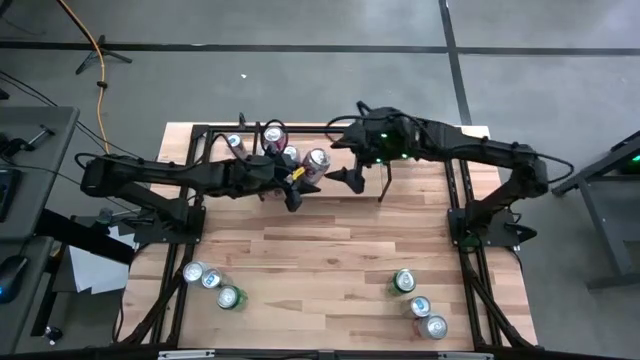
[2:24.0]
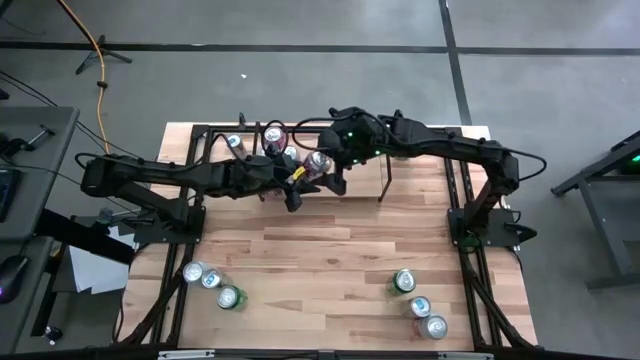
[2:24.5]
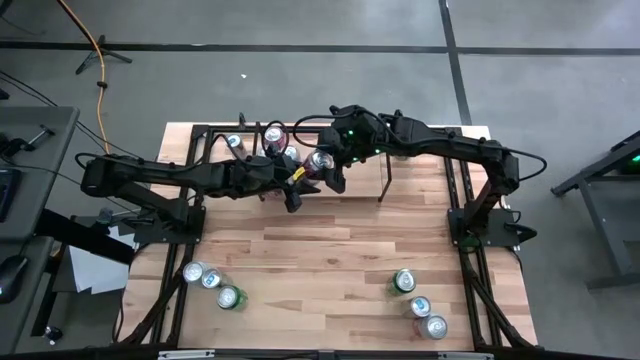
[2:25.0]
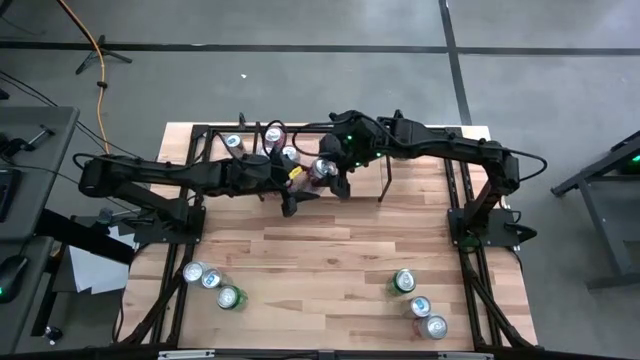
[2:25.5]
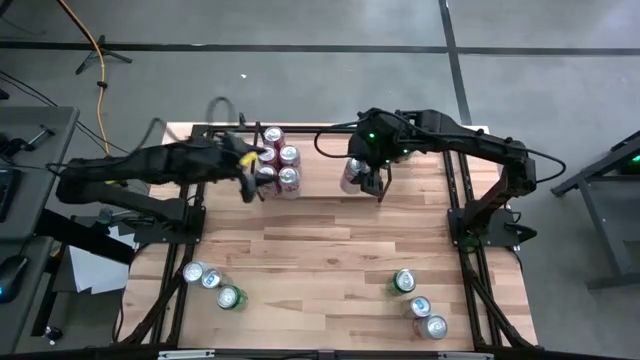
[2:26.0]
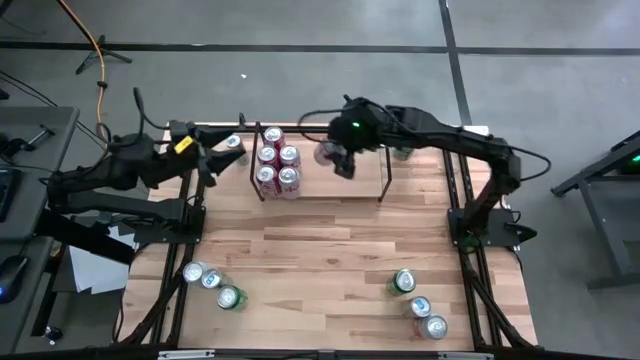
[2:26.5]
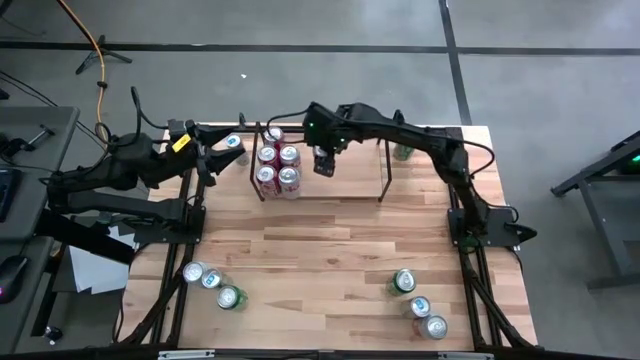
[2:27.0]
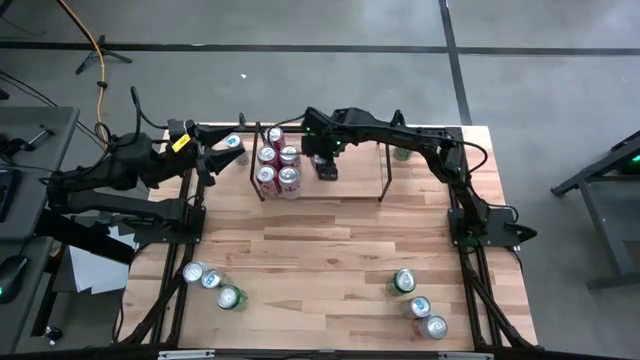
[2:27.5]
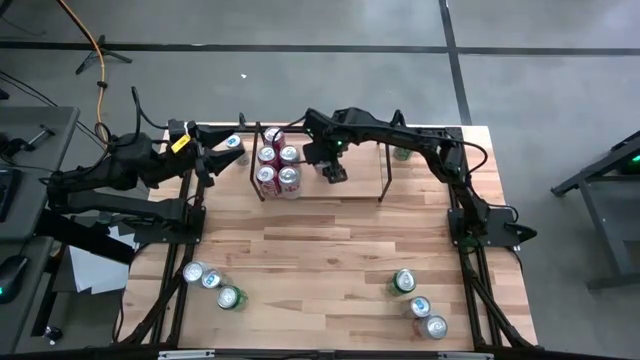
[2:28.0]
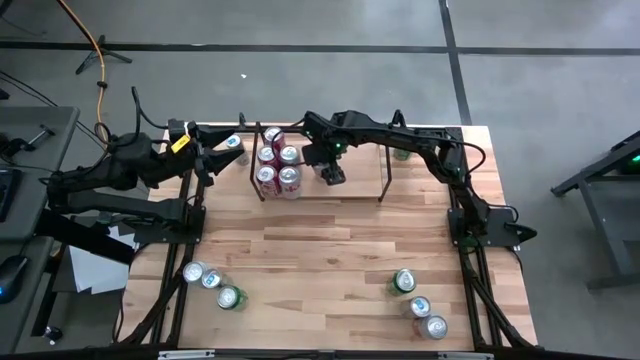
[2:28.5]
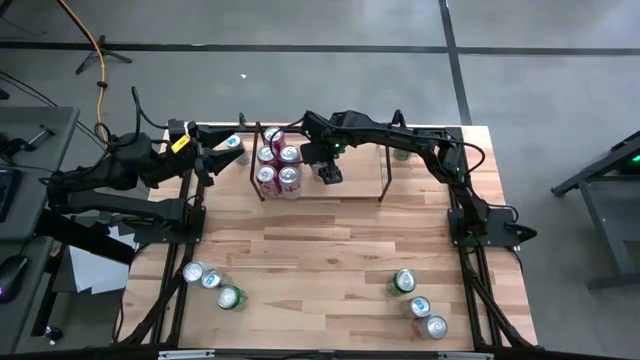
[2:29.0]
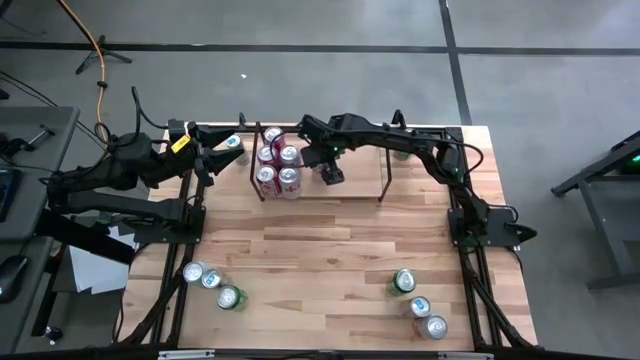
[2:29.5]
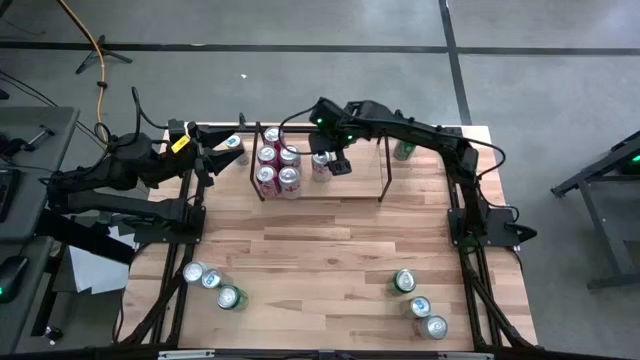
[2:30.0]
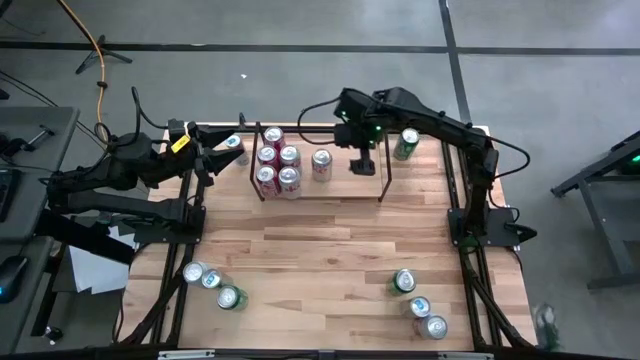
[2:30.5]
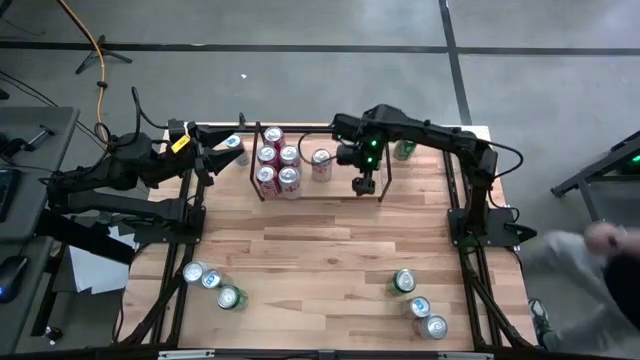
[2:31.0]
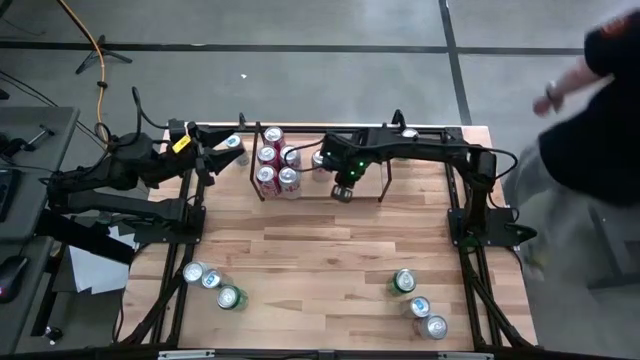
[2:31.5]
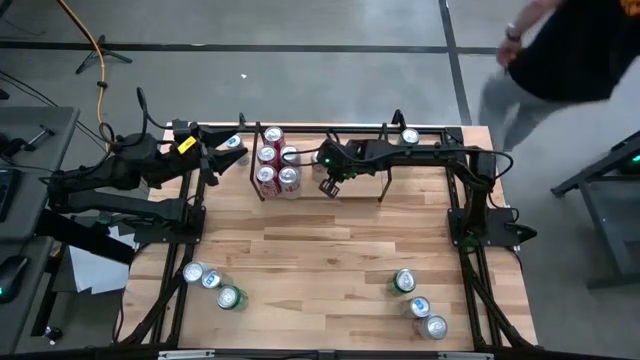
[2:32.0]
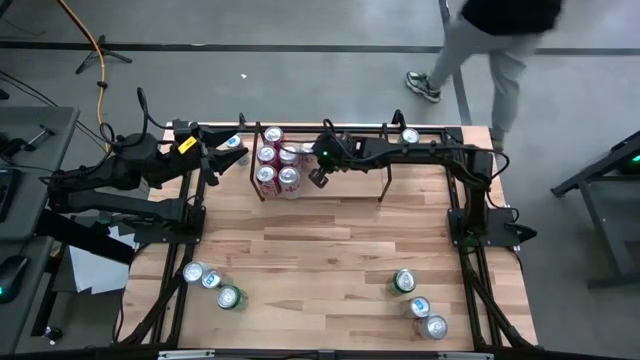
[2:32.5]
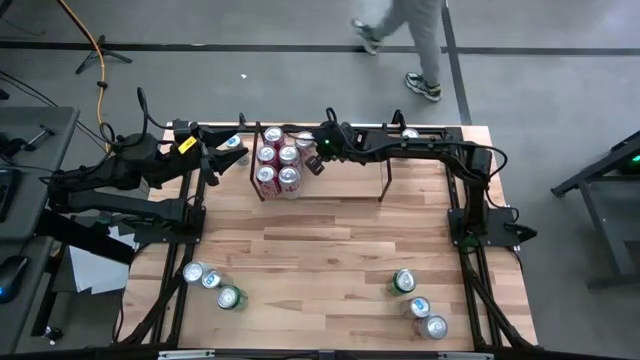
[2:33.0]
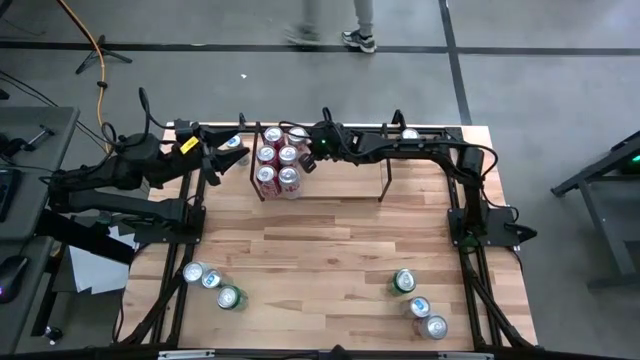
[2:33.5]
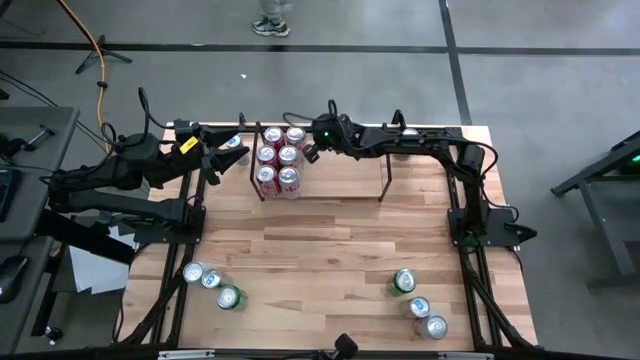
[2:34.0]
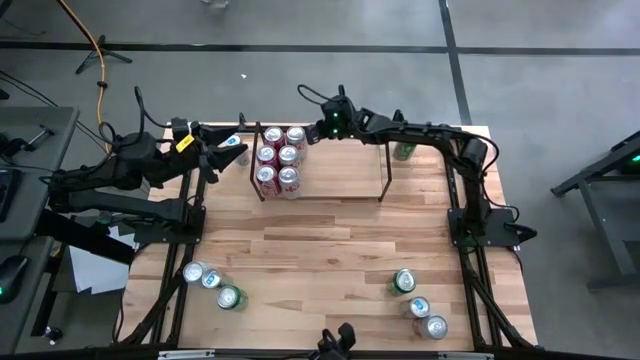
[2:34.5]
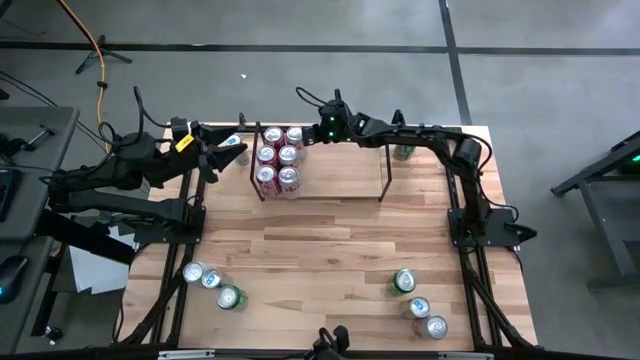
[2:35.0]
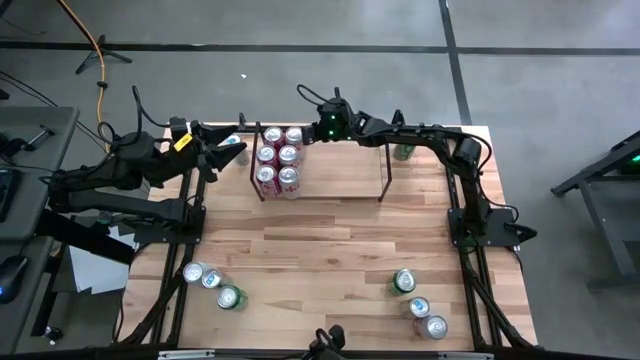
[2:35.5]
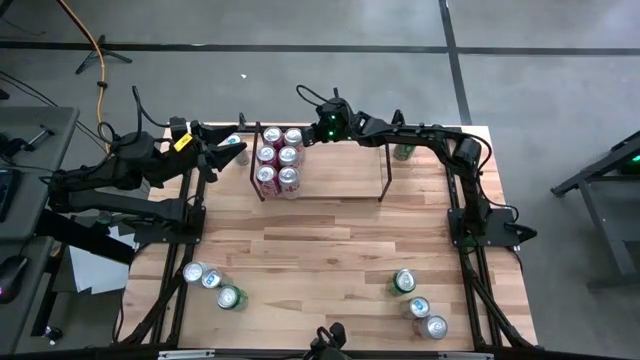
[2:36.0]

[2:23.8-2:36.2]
Task: Place canned beverage on shelf
Put the silver soda can on the shelf aligned with the other silver soda cans

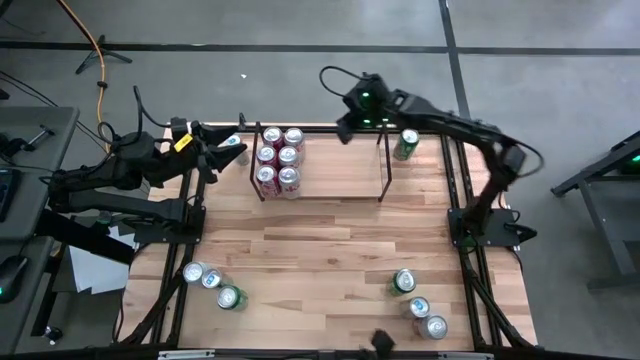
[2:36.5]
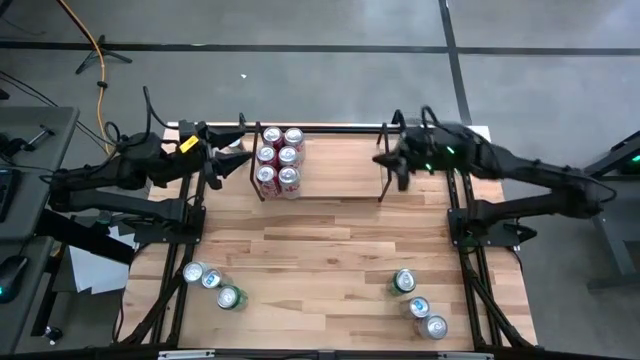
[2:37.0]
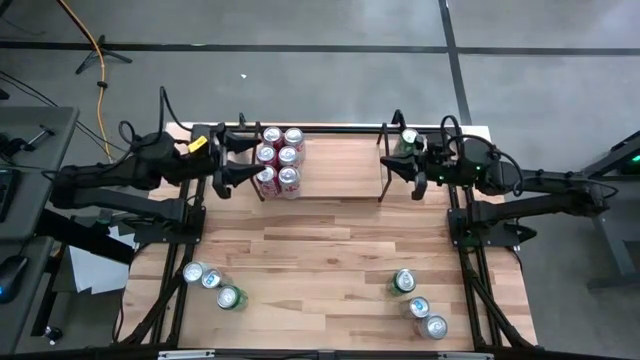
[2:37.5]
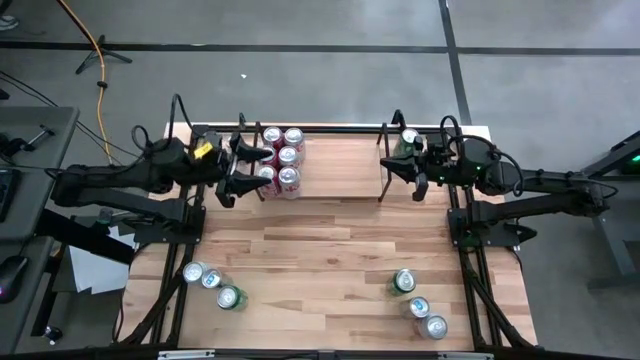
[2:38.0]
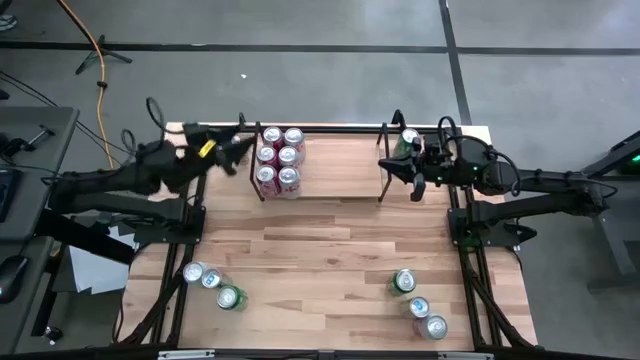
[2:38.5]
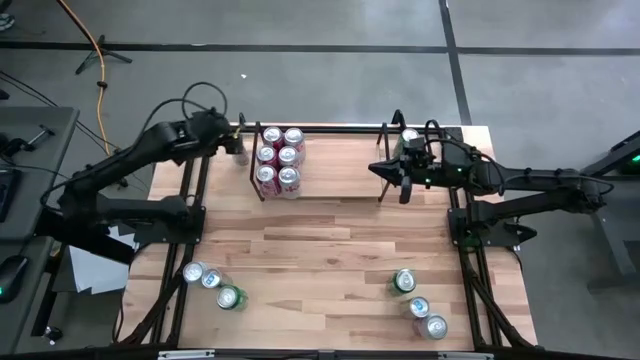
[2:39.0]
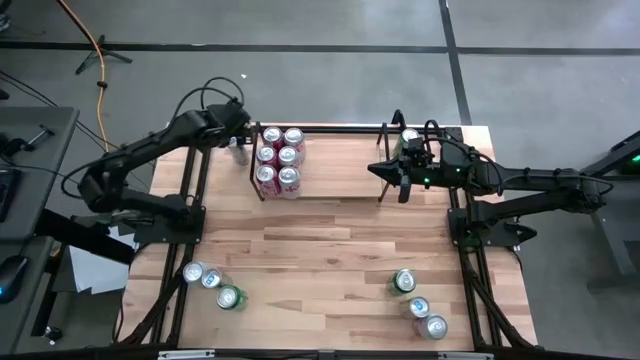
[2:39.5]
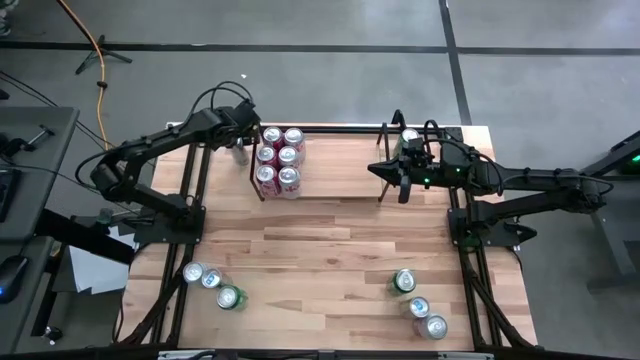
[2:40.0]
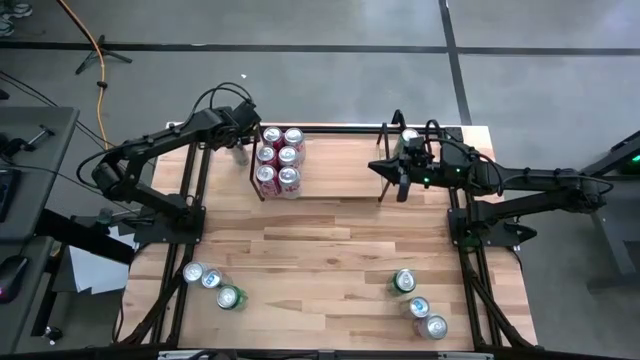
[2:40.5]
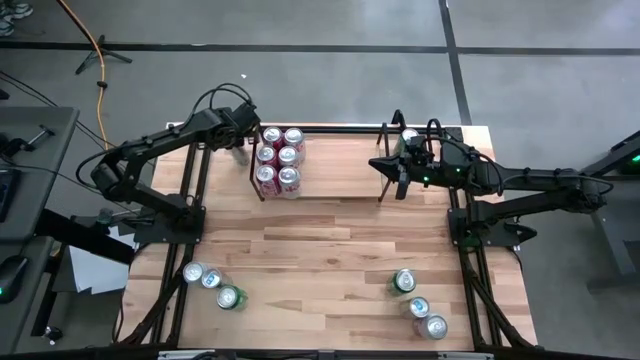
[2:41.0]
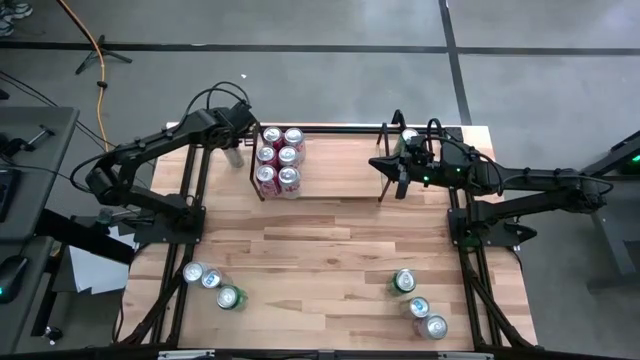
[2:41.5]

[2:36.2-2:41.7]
Put the top blue soda can on the shelf

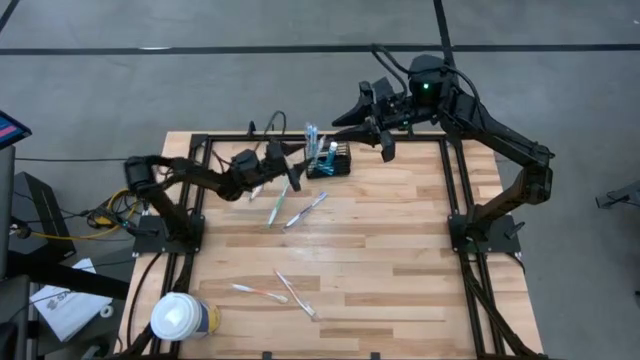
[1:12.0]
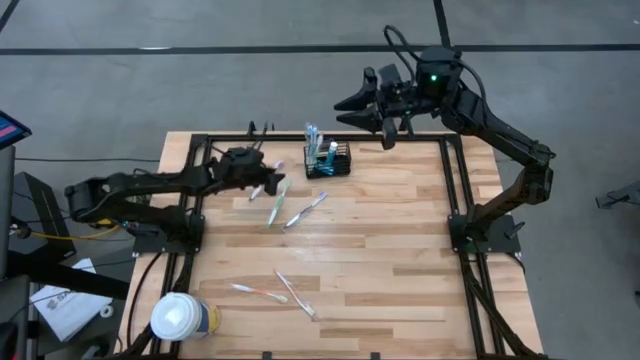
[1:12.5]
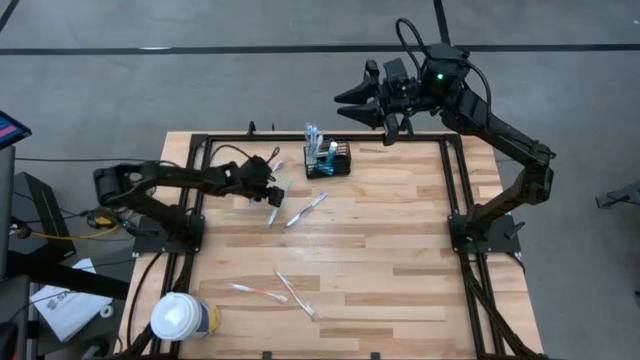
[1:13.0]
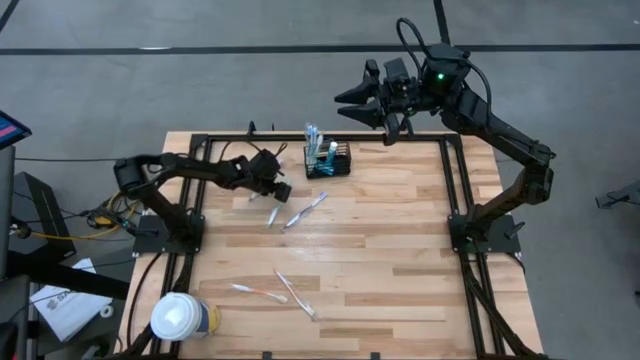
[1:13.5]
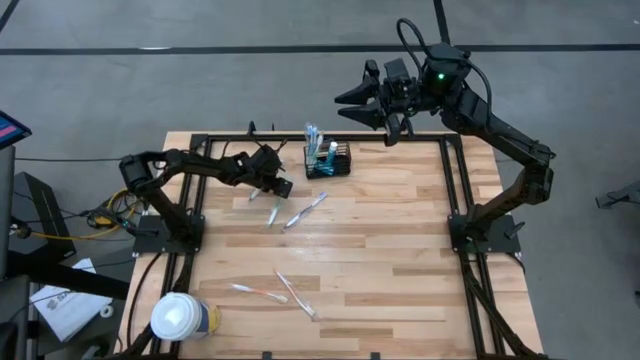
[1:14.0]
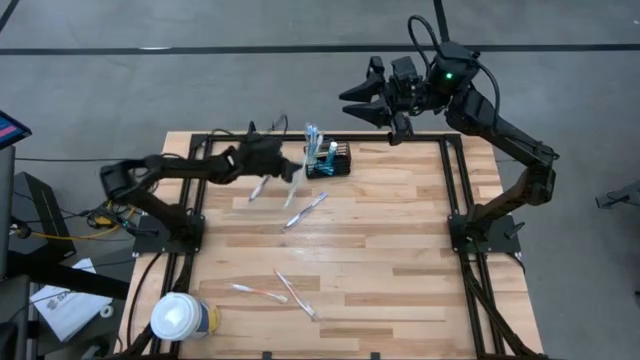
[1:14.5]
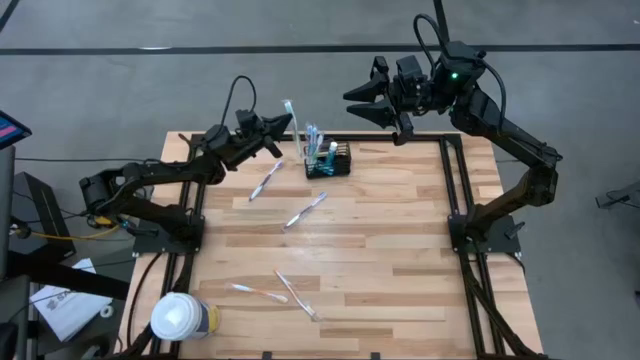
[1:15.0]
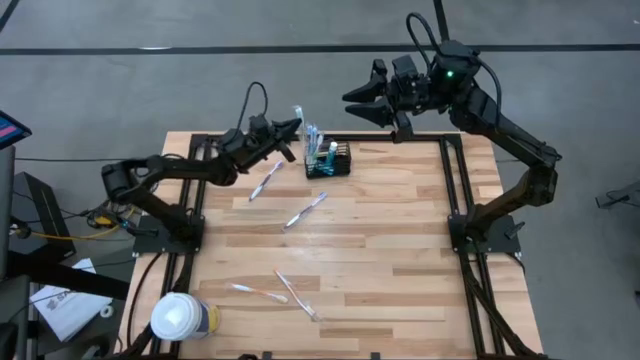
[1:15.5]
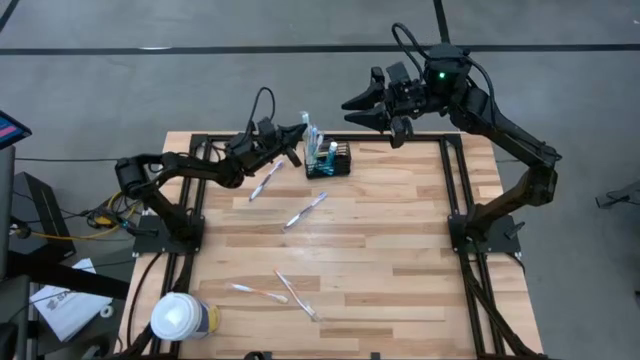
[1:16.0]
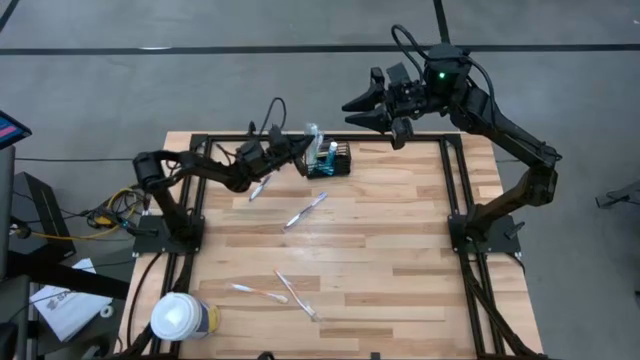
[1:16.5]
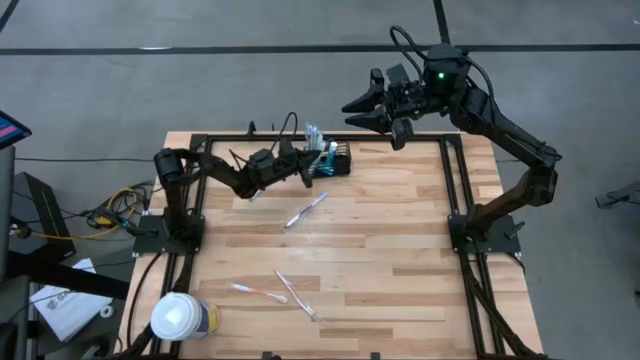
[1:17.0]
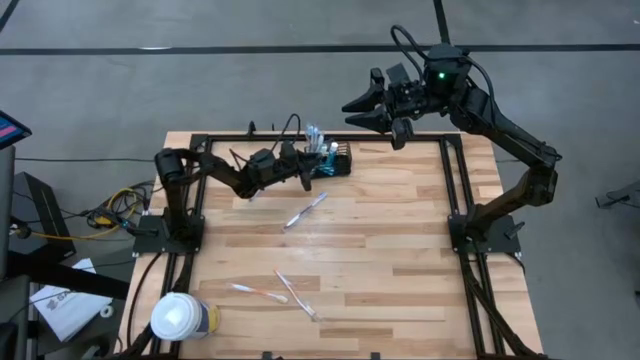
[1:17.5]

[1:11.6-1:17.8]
Task: Pick & Place toothbrushing station
Put the green toothbrush into the black wire organizer
